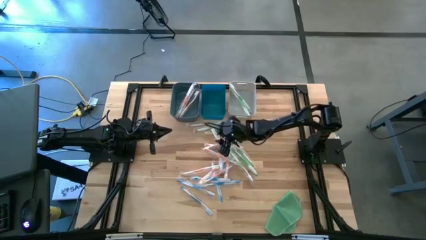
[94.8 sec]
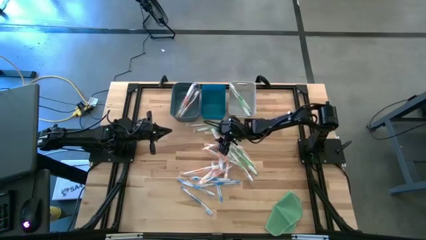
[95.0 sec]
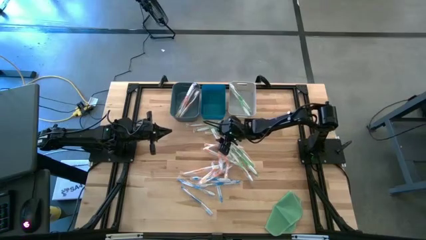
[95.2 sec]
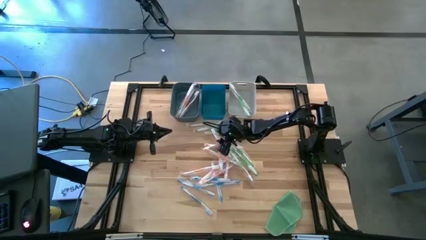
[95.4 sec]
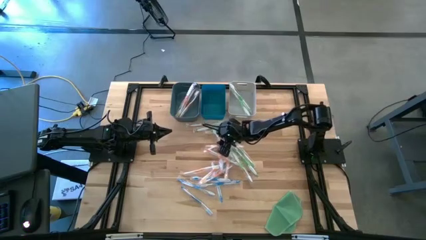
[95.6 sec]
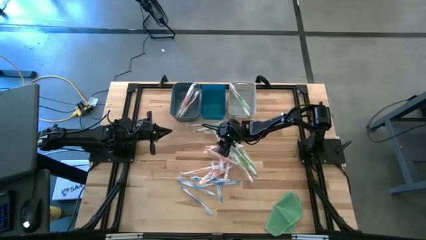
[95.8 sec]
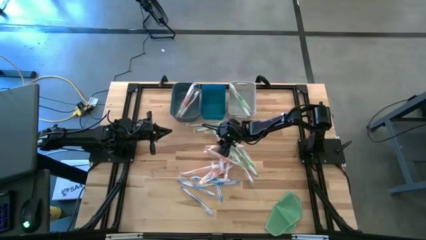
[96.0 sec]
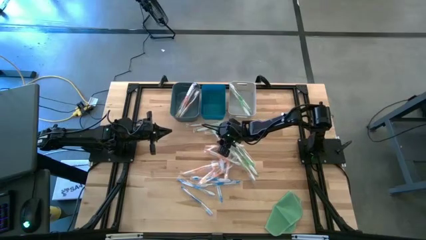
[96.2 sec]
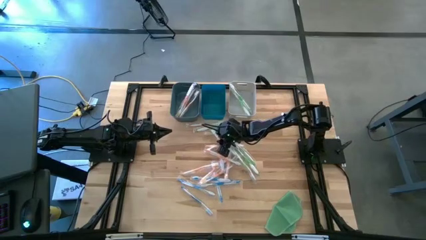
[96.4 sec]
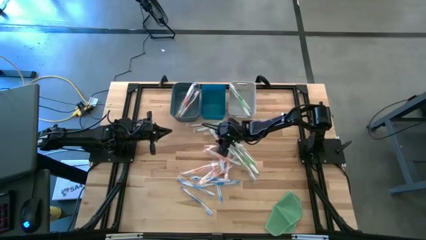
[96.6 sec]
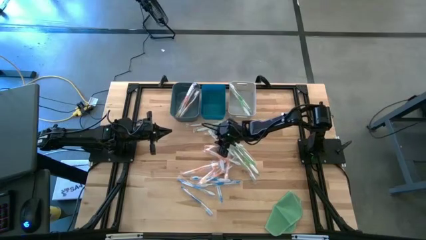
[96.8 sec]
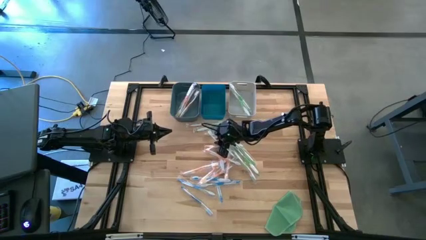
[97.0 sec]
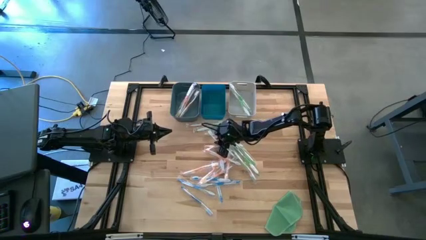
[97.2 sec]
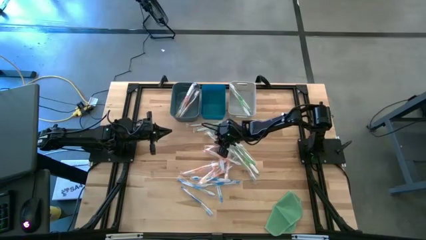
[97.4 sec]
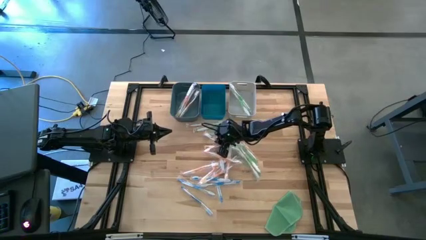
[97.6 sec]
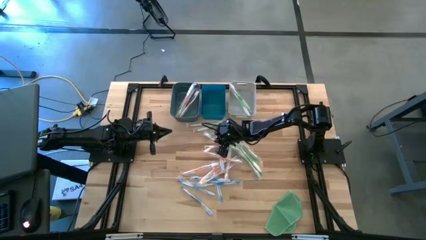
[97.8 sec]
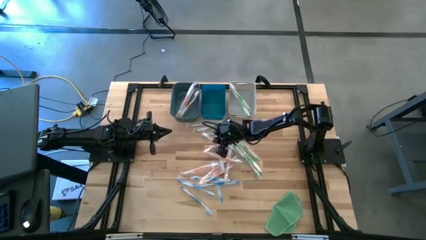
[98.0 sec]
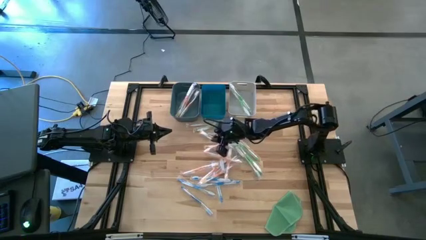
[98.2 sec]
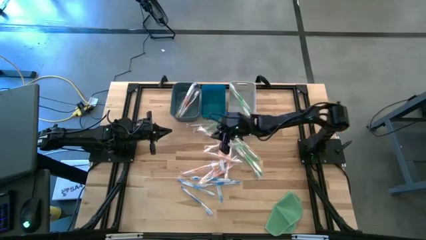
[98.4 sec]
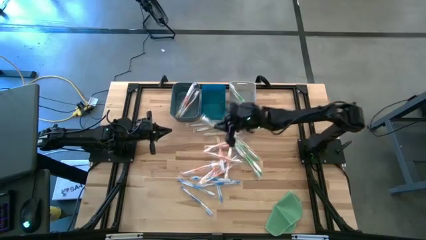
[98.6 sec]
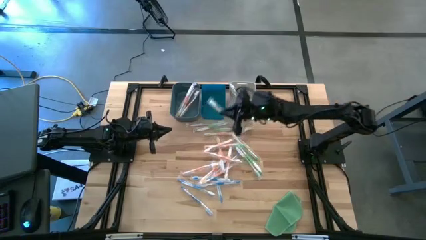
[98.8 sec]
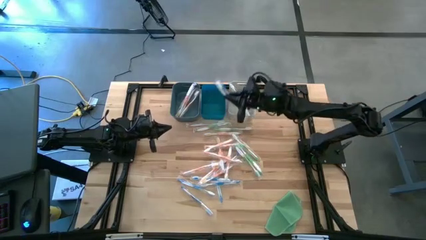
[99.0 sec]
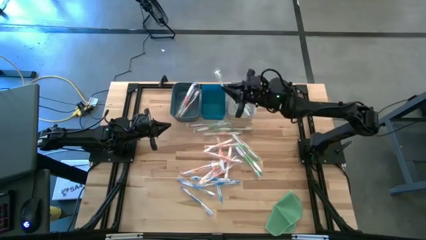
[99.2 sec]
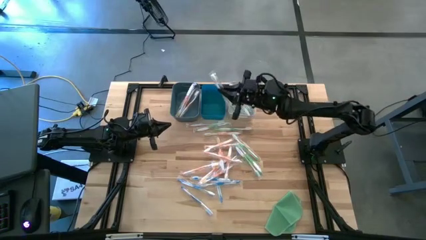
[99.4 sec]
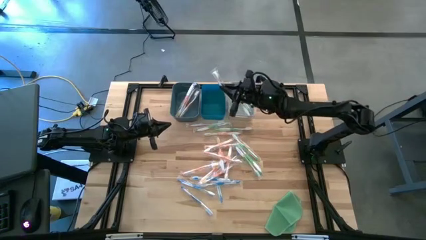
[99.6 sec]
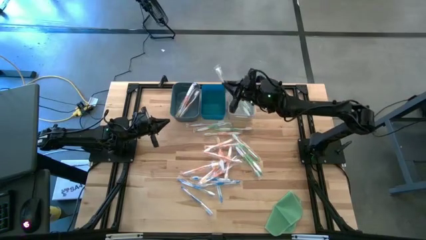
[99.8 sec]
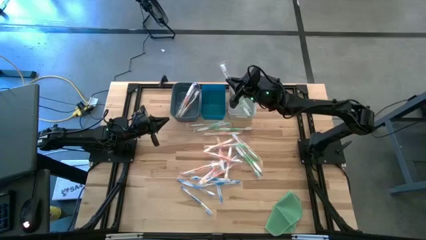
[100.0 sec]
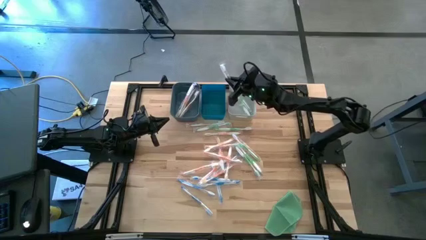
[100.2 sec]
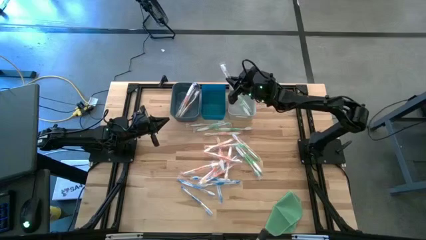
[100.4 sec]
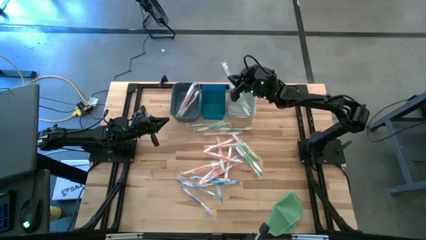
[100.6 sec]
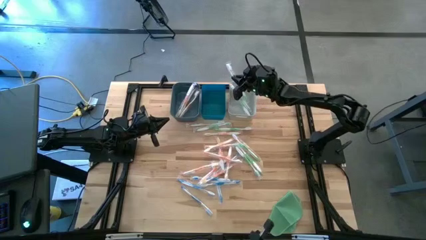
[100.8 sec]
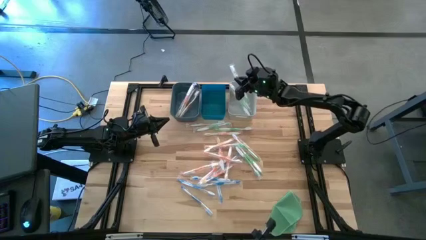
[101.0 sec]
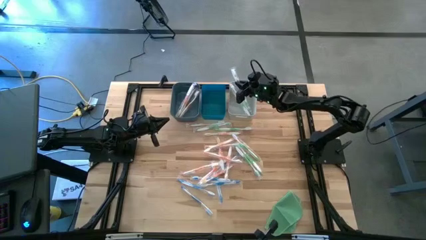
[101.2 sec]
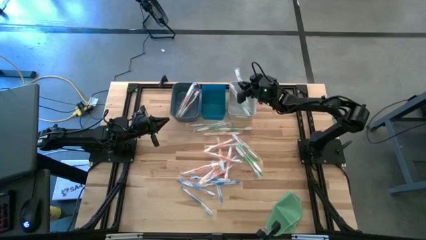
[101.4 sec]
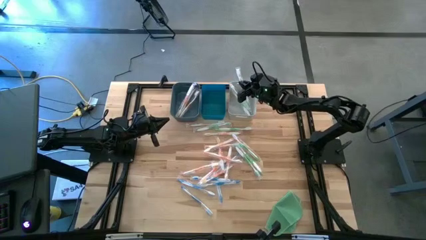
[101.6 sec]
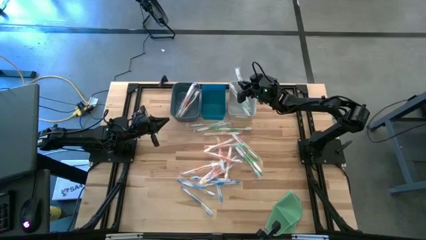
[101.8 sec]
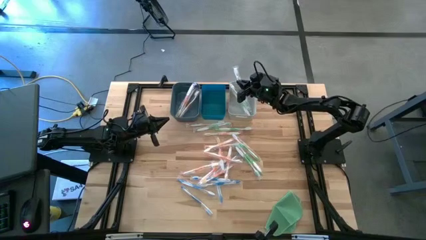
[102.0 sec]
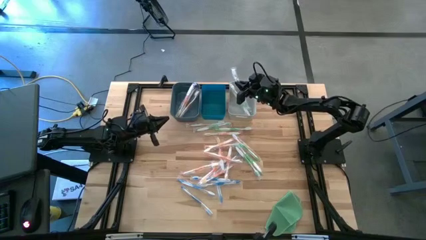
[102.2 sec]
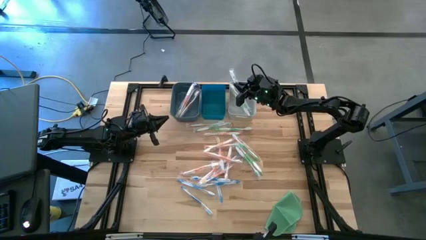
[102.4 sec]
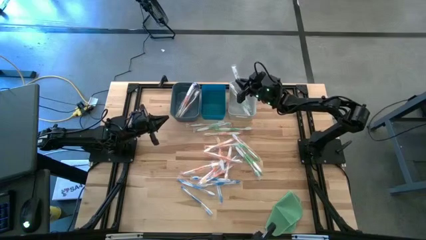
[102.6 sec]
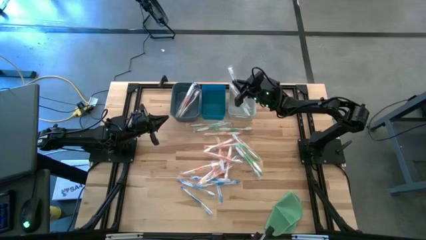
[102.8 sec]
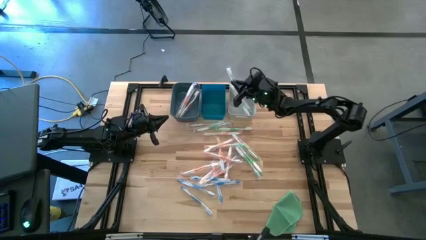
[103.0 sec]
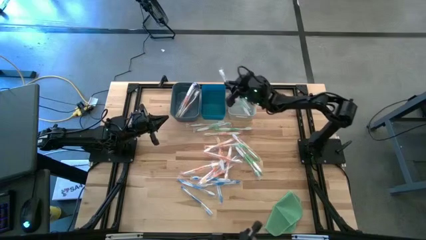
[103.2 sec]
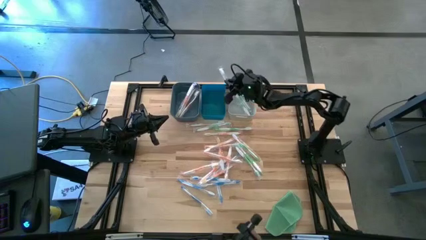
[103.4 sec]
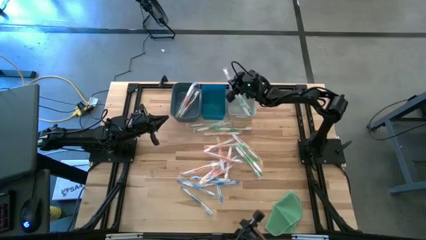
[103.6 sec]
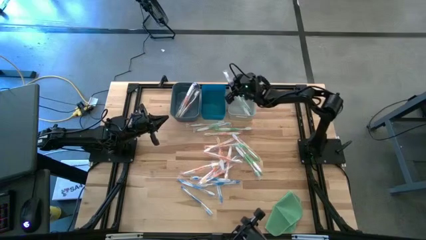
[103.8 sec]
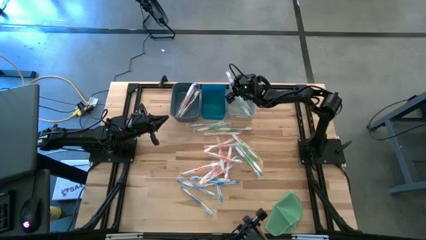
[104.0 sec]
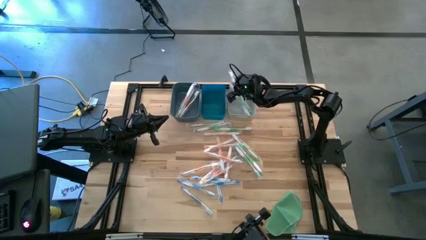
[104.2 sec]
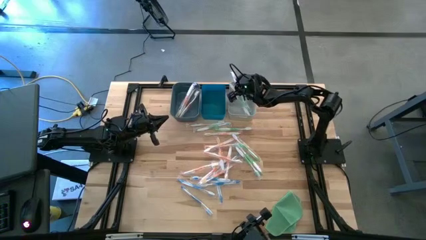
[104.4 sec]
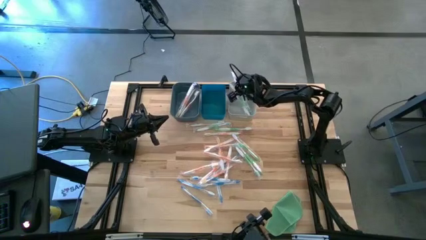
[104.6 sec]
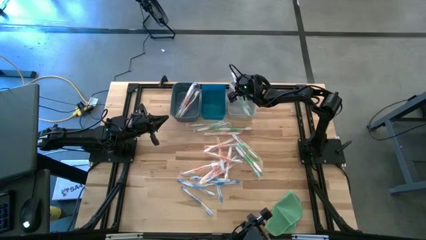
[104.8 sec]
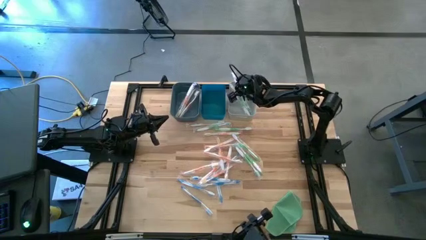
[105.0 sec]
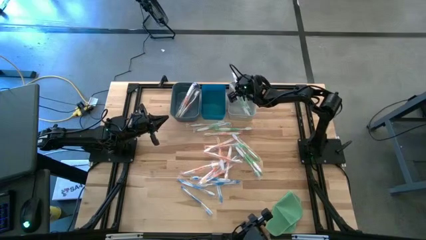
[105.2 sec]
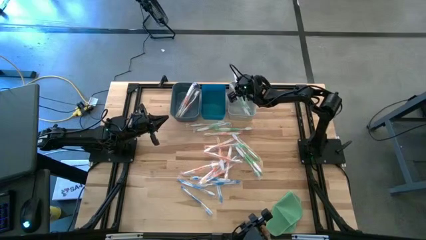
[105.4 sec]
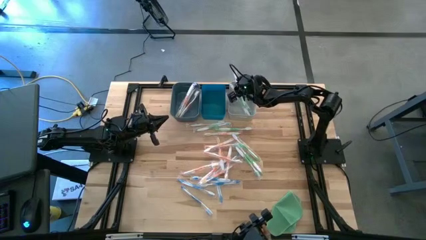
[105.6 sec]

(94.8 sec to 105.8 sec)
Task: Pick & Place Toothbrushes
Put the green toothbrush into the white bin

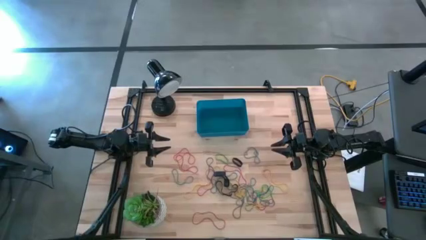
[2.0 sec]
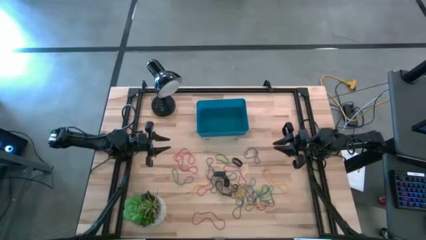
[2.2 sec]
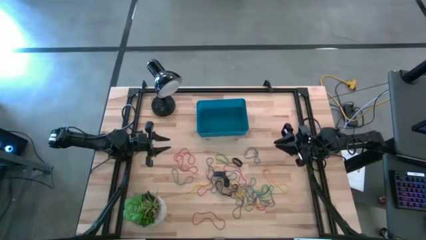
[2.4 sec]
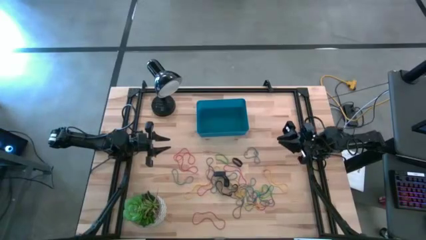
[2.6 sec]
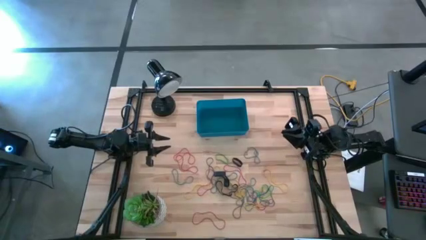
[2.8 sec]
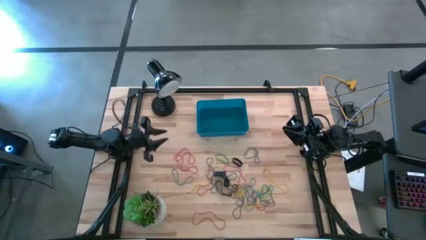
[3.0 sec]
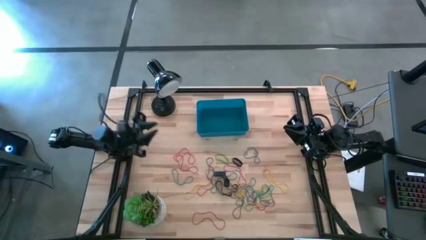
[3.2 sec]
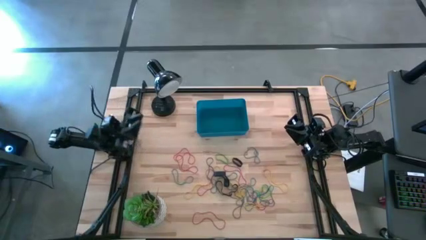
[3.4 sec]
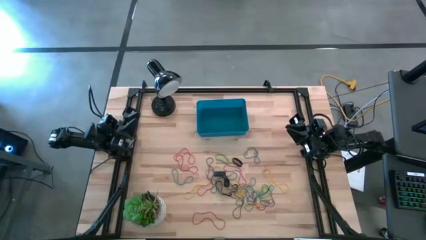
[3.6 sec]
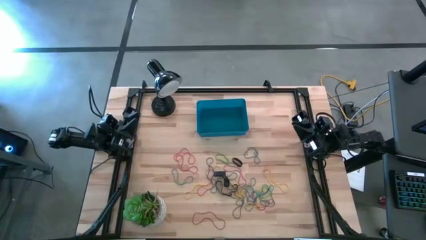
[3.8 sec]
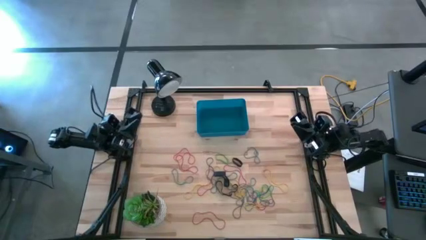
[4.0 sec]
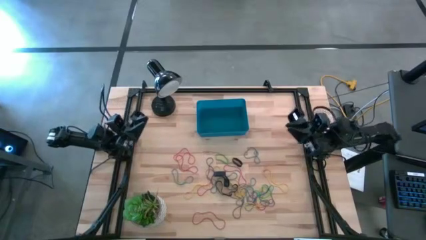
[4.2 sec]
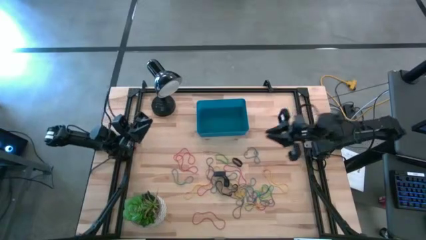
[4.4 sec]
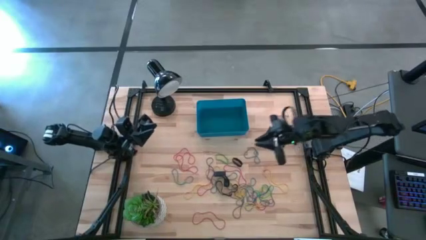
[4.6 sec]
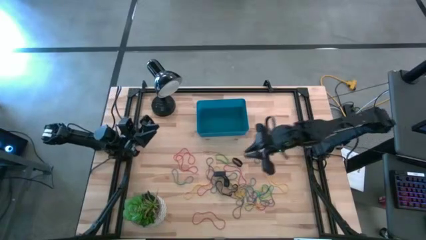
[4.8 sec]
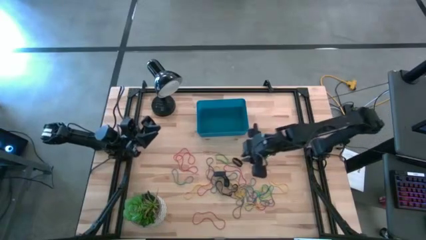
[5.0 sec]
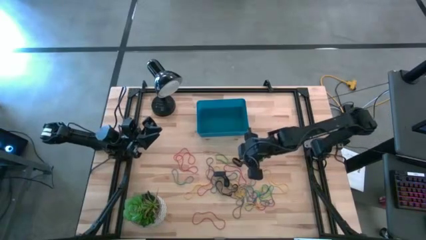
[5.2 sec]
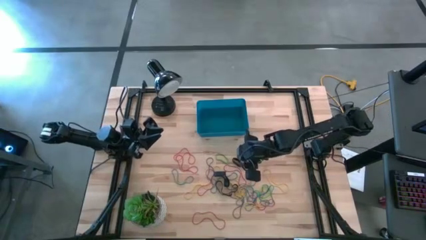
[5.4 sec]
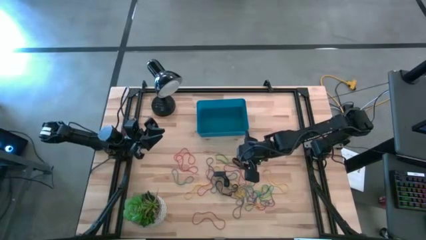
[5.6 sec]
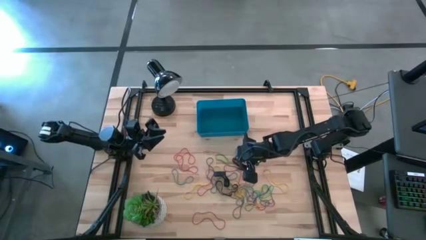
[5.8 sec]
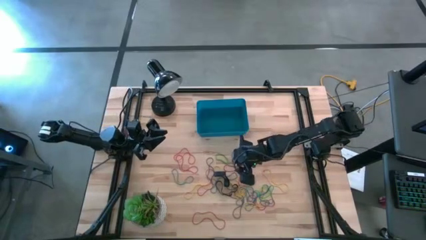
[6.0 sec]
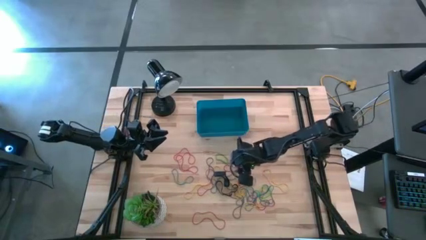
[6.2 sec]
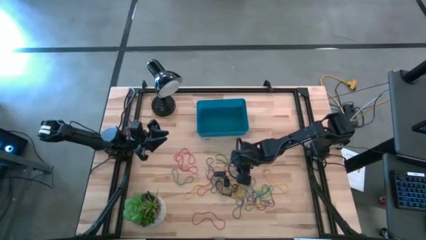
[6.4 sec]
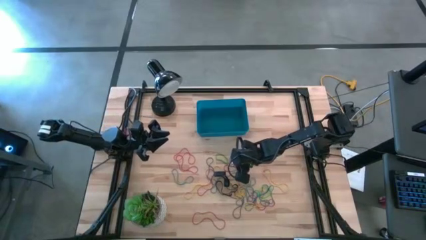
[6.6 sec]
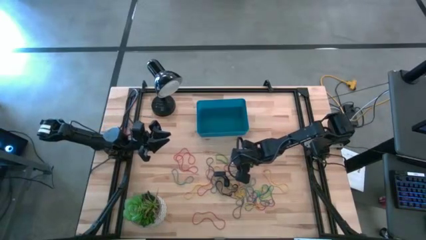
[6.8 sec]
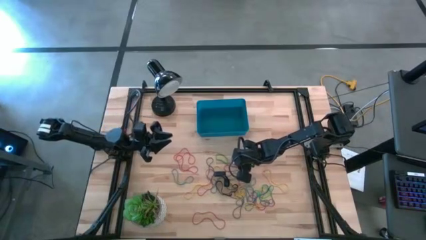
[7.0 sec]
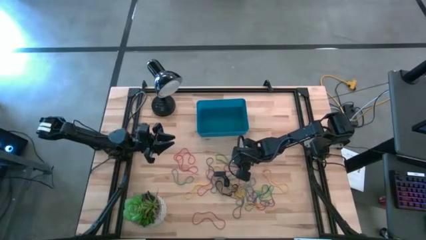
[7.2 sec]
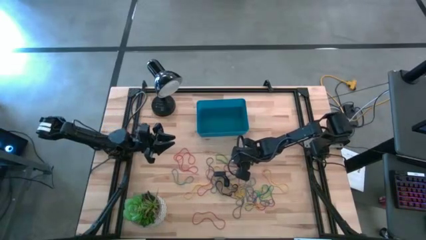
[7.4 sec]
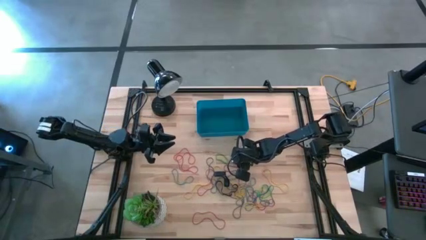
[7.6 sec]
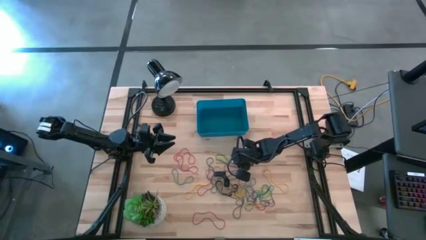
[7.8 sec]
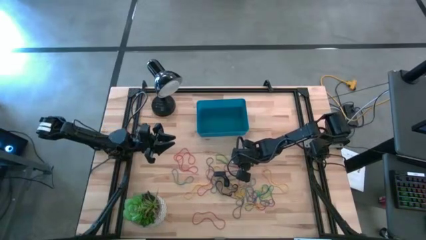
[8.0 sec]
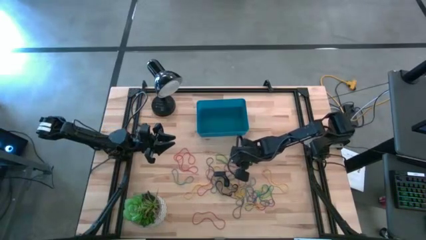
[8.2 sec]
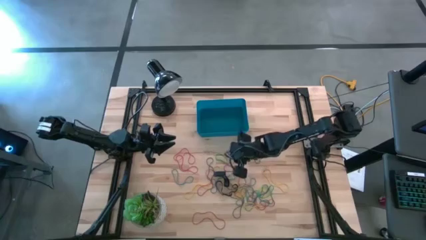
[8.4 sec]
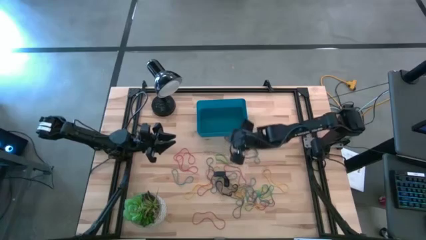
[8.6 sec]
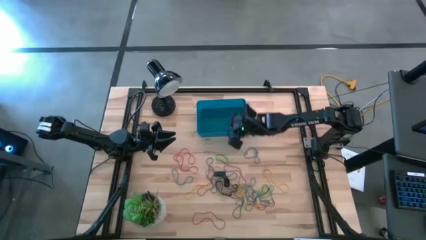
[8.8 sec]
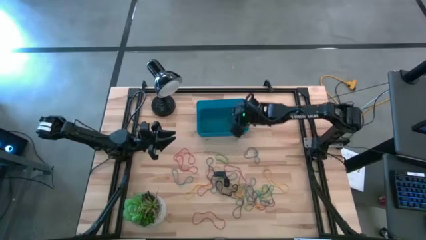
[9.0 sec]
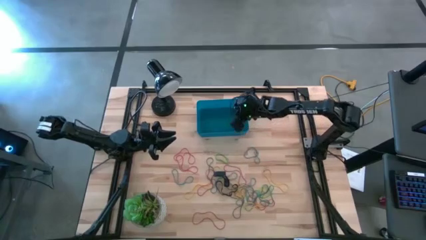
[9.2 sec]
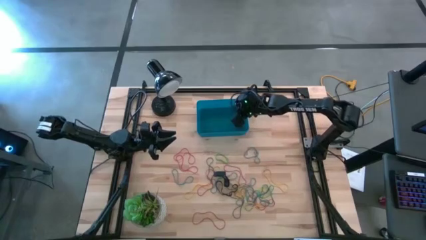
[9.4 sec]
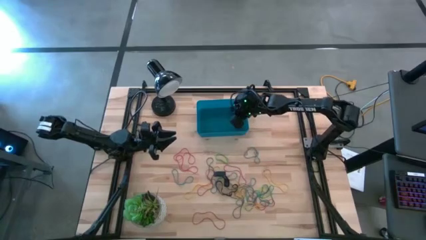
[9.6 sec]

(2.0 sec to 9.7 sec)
Task: Pick and place rubber bands into bin
Put the black rubber band into the blue bin
